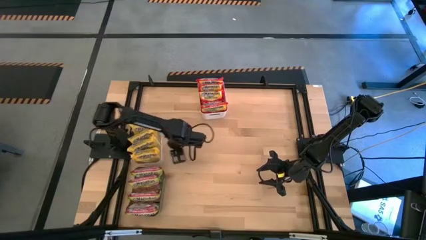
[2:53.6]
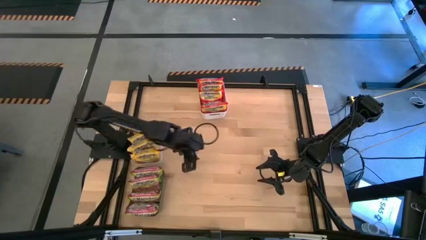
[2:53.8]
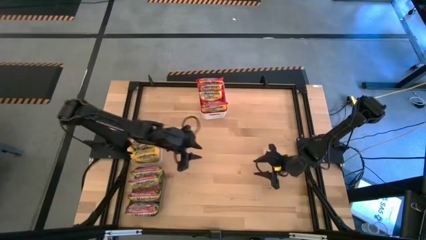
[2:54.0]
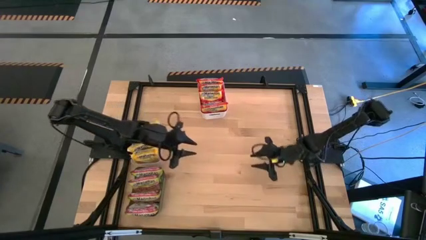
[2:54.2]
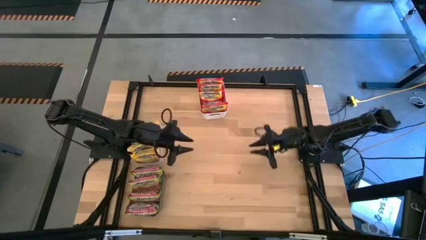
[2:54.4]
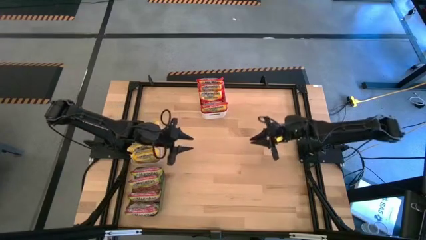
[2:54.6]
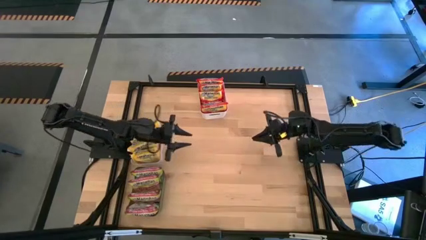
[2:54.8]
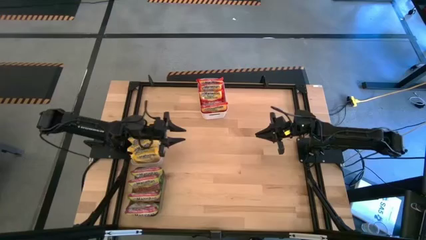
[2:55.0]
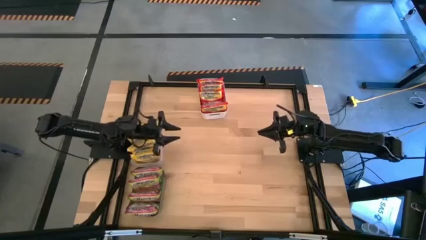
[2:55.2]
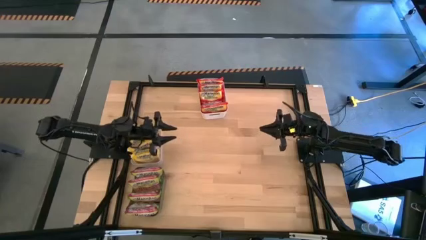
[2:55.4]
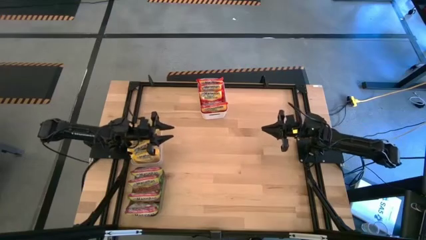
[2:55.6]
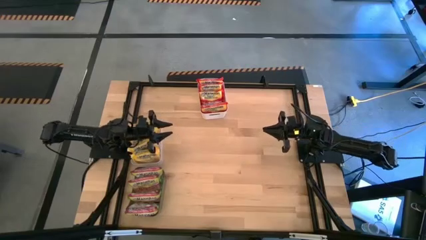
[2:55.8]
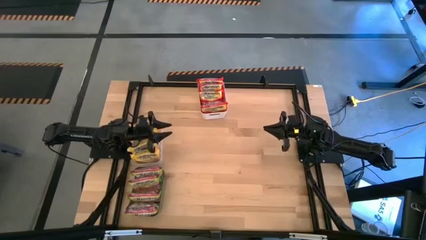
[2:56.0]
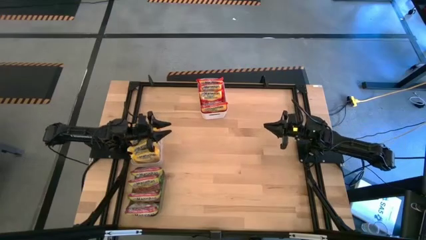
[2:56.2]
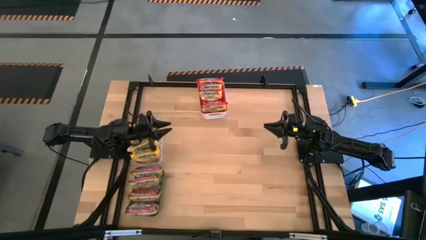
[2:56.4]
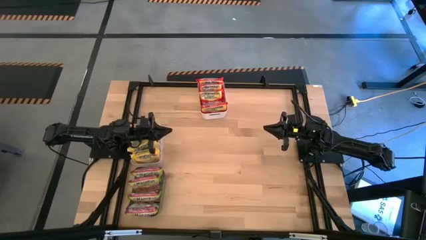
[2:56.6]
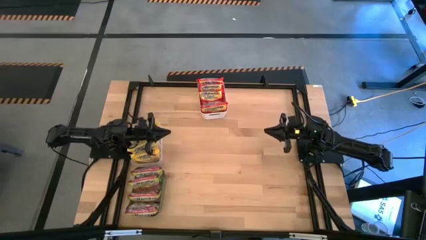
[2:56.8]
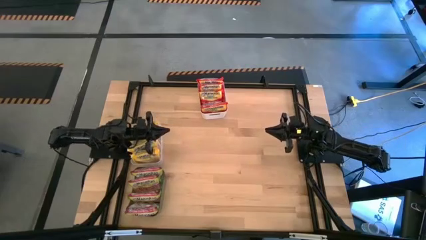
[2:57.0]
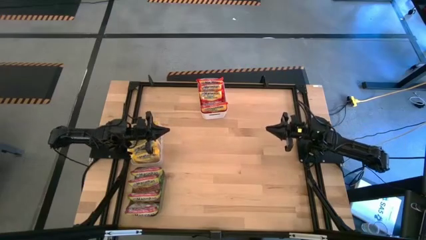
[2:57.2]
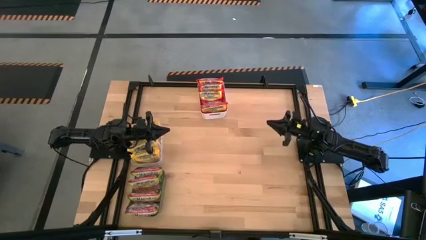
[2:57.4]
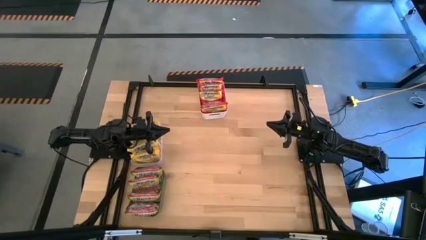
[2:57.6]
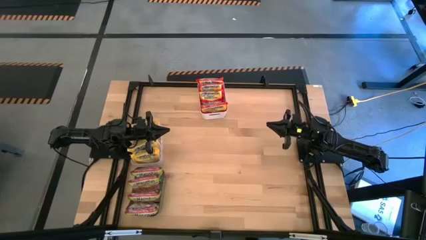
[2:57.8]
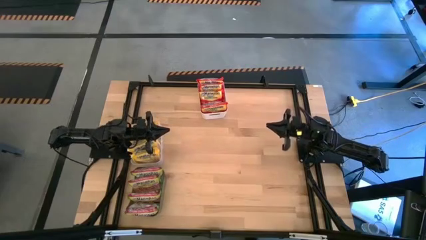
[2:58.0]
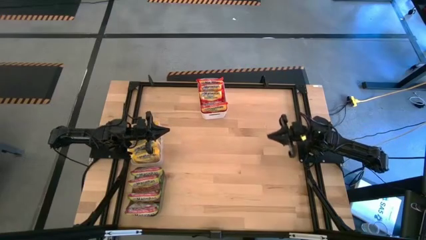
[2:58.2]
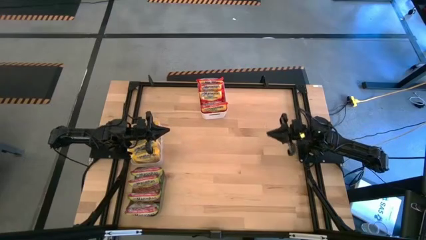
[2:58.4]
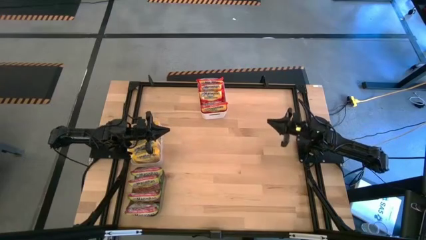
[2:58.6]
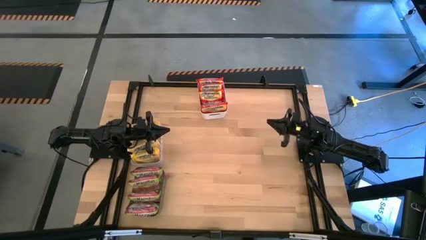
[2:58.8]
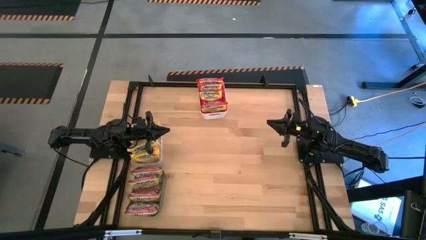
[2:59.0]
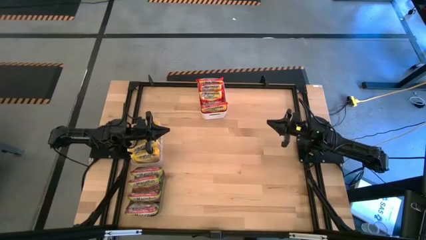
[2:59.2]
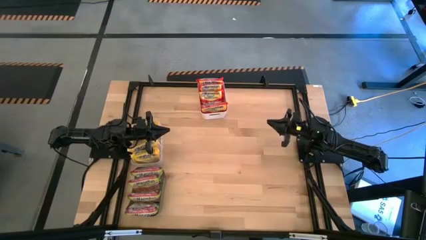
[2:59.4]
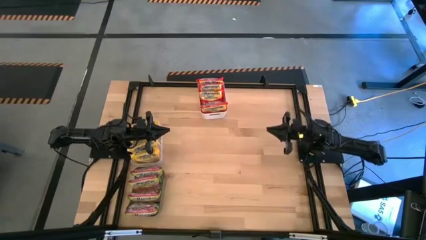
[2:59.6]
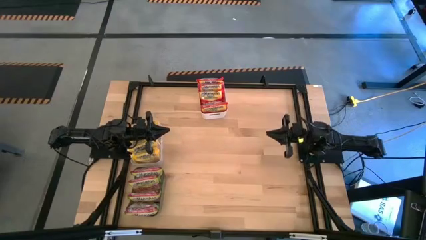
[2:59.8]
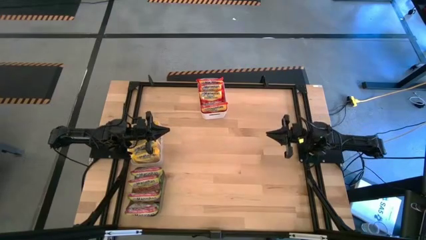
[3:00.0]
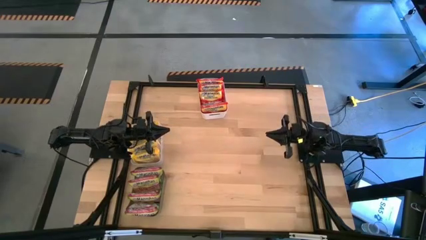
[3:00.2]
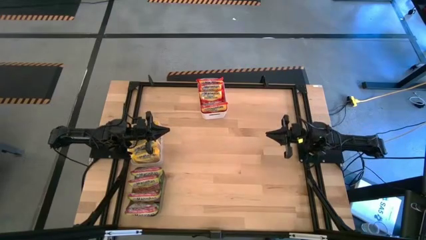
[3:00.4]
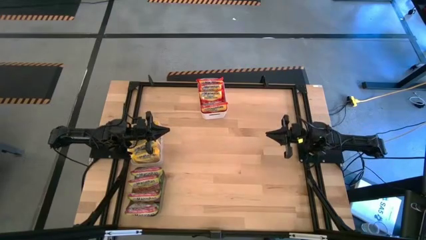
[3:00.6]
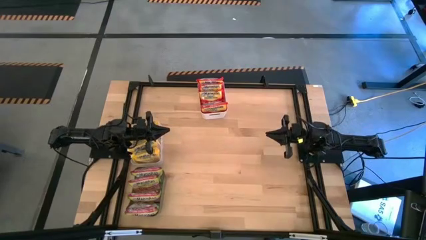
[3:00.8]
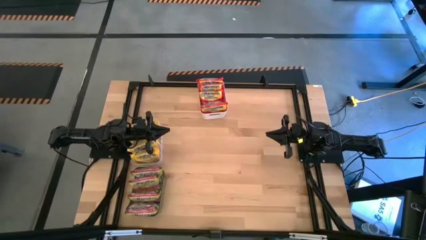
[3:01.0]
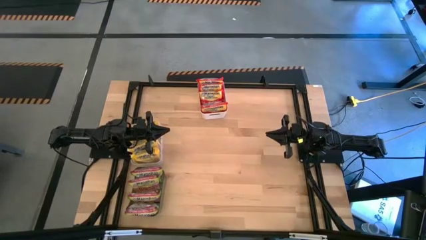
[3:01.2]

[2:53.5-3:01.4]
Task: Sort Maruchan noodles
Return to Home Position

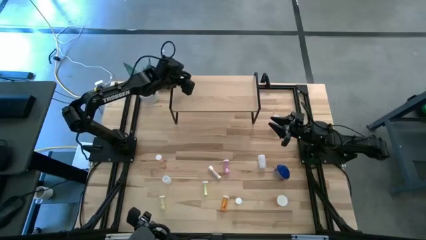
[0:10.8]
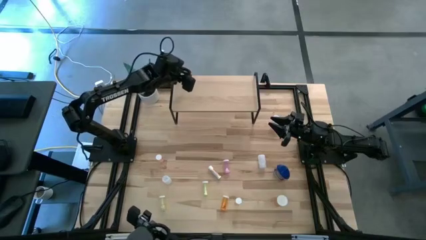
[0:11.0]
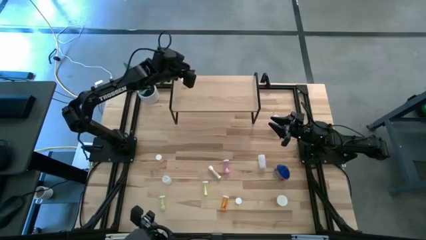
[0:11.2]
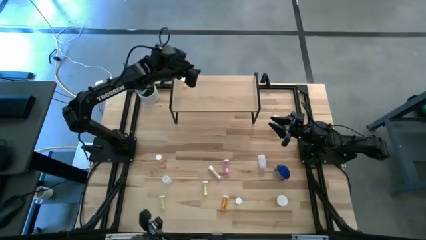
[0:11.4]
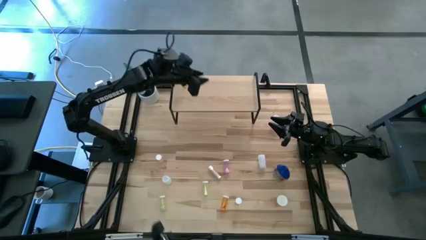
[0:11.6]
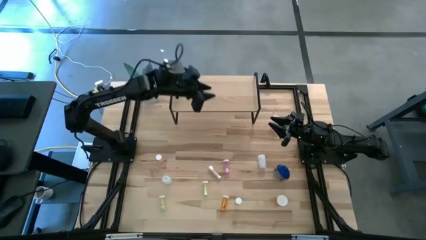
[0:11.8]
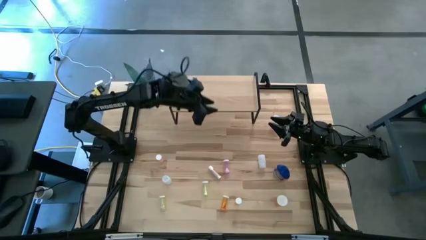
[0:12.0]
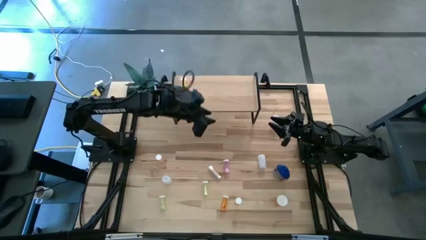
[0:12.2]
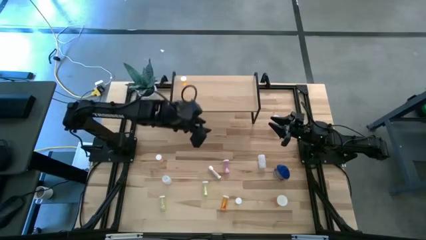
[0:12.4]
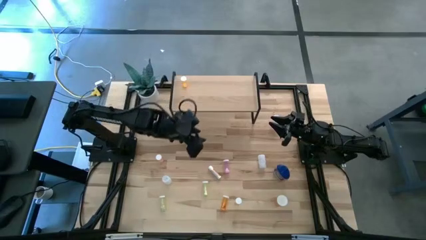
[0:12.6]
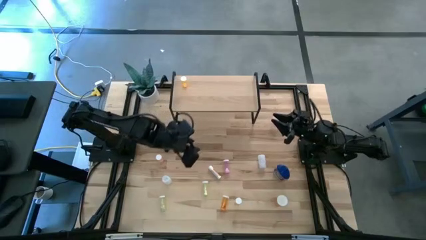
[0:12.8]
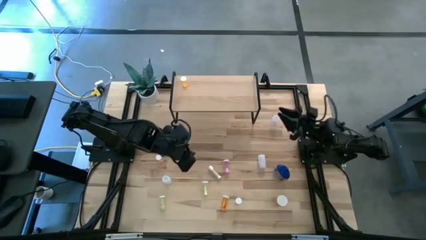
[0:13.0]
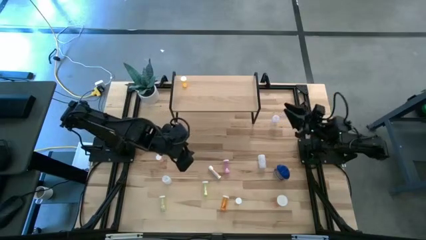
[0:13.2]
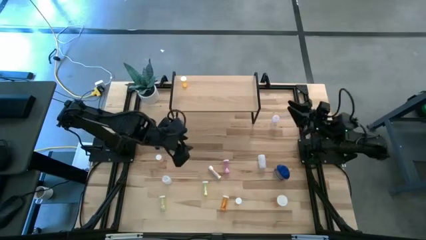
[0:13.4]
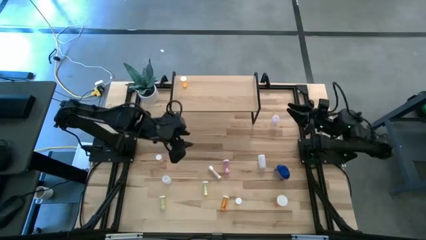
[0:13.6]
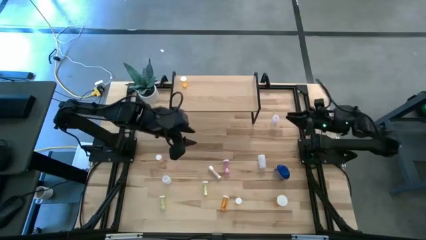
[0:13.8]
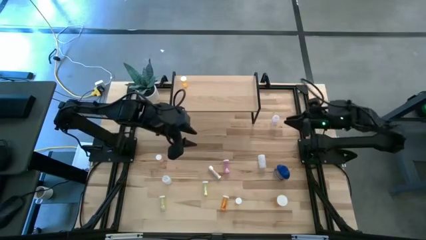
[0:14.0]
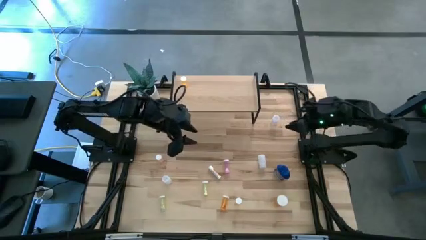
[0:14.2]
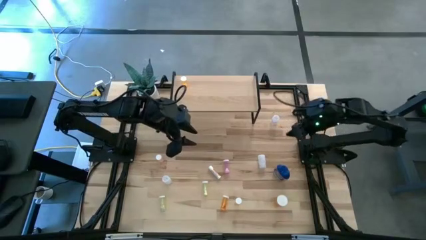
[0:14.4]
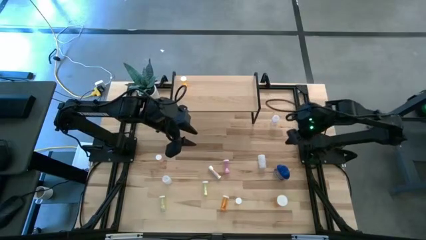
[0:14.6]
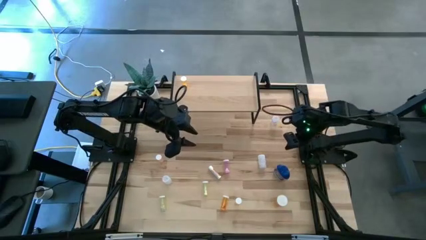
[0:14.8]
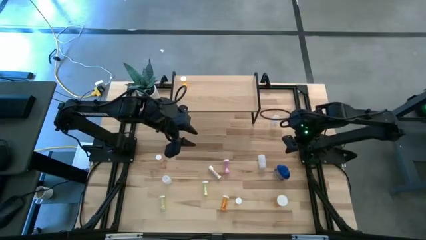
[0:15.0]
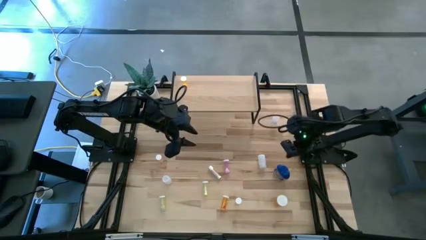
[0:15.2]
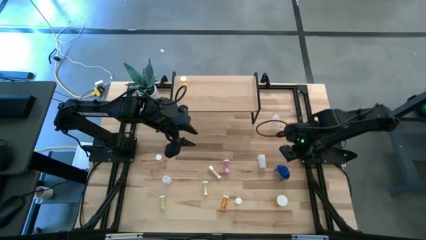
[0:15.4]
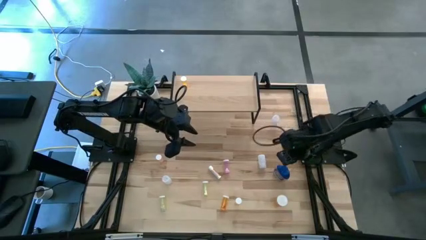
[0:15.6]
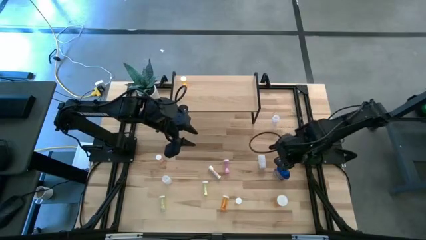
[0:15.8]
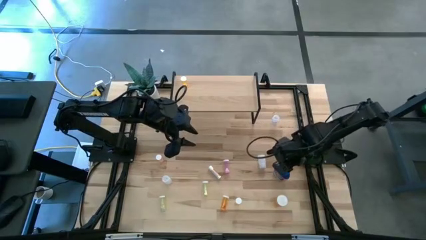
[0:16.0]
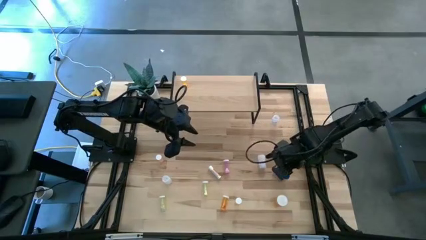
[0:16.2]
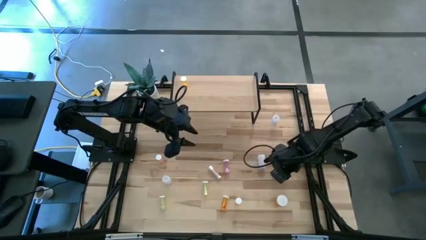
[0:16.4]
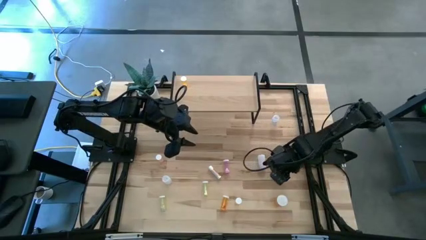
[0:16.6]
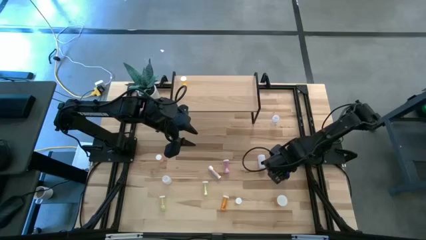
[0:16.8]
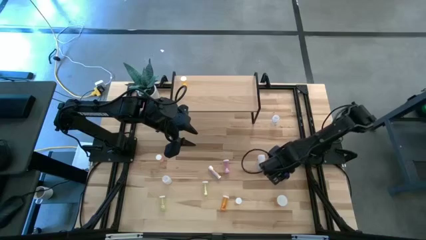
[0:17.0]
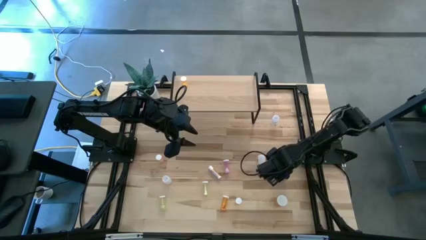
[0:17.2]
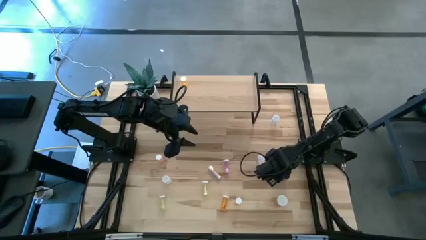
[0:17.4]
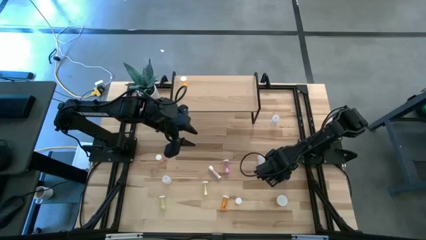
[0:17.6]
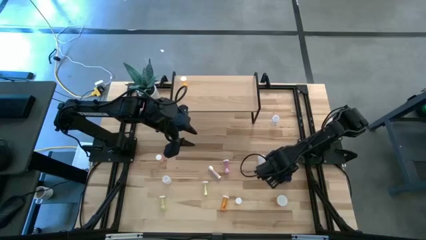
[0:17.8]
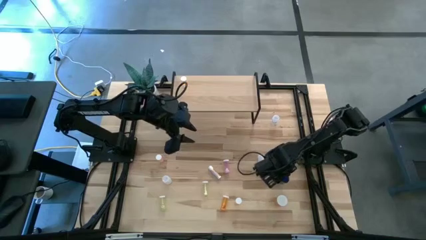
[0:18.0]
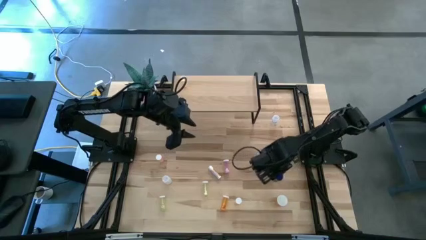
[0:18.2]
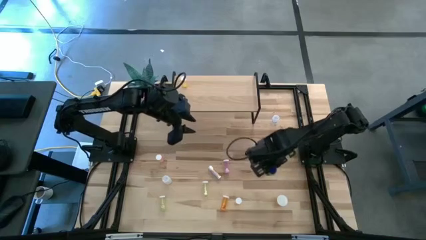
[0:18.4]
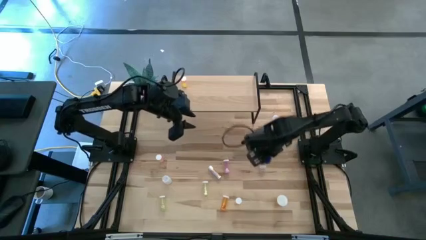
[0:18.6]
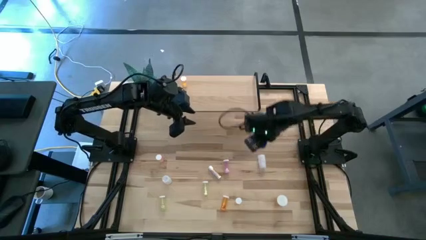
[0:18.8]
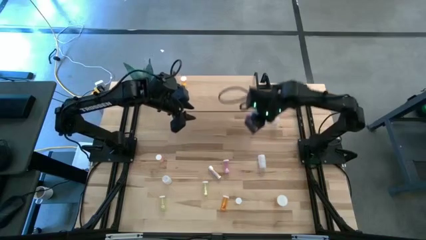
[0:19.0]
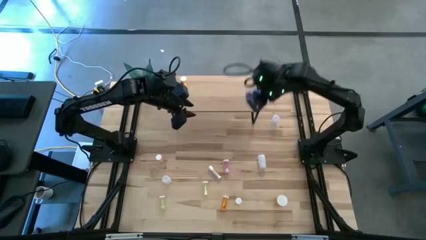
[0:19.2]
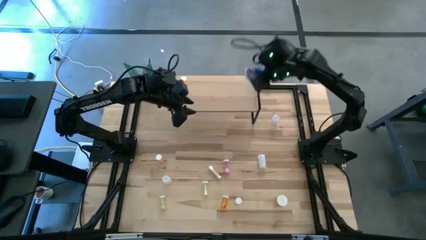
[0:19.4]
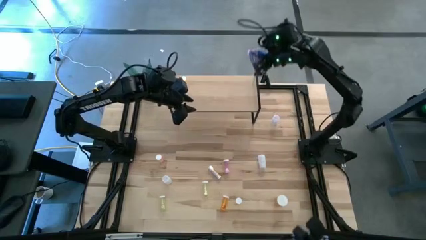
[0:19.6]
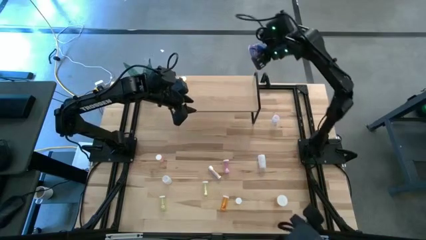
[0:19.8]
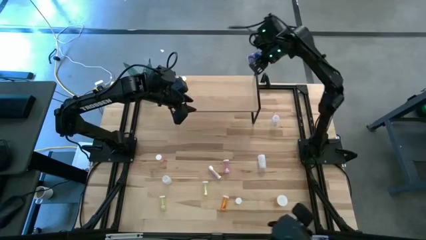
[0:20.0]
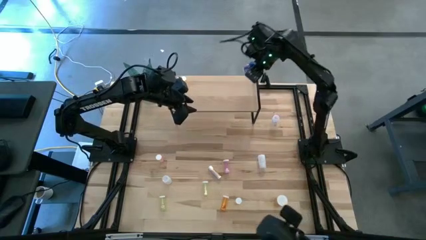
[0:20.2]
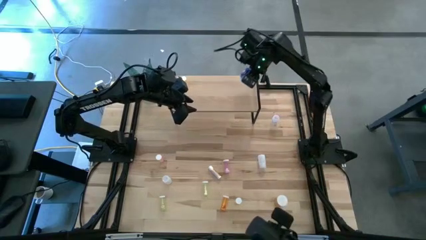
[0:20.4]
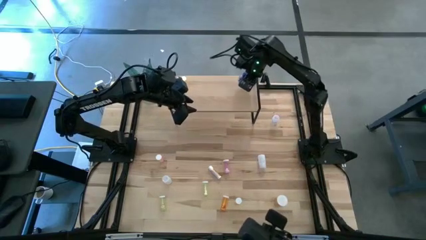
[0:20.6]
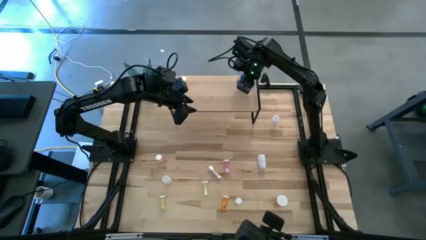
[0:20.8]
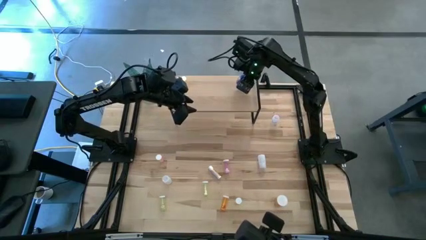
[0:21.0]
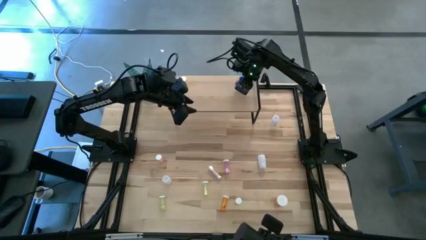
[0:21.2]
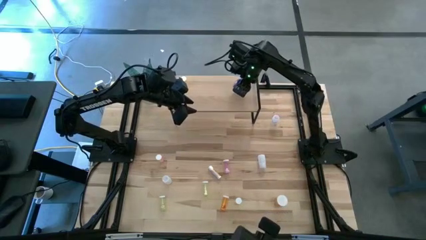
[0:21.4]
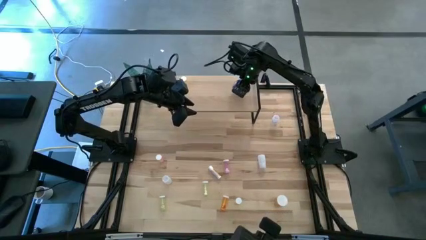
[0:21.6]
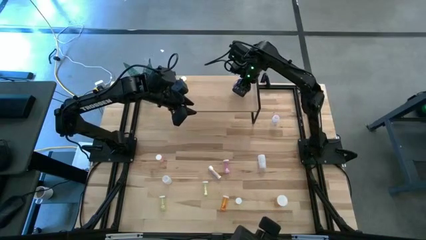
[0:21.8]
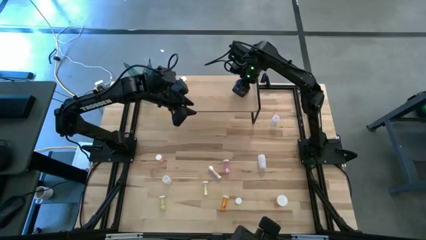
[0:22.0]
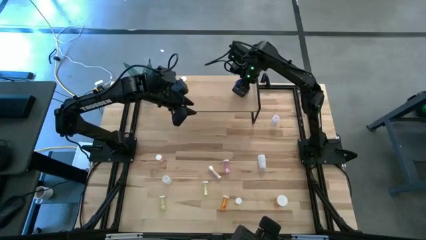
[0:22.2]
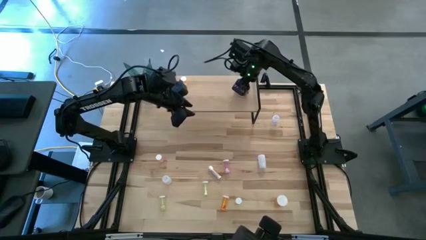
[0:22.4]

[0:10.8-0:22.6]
Task: Pick and place medicine bottles onto shelf by color
Put the blue pill bottle on the shelf
